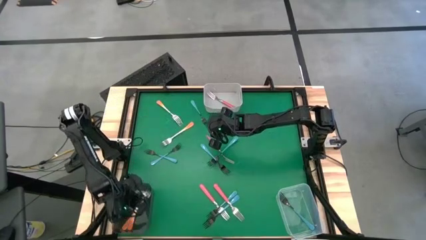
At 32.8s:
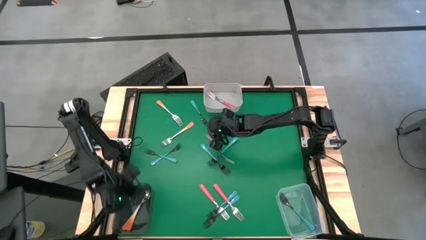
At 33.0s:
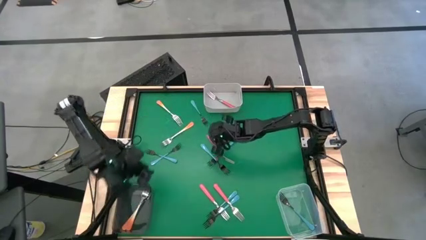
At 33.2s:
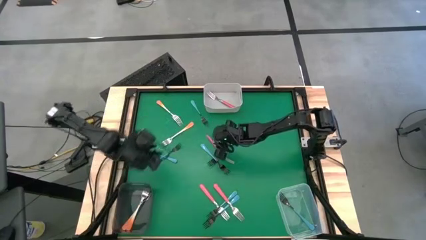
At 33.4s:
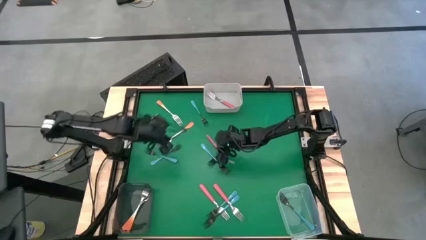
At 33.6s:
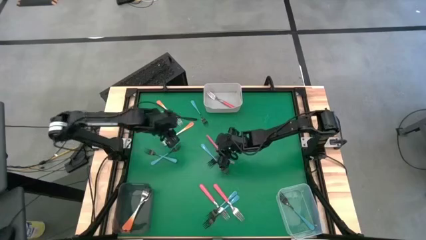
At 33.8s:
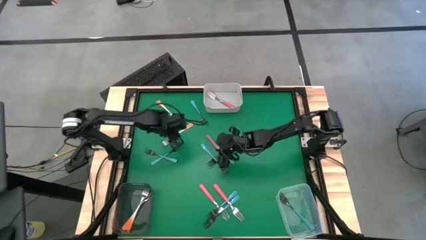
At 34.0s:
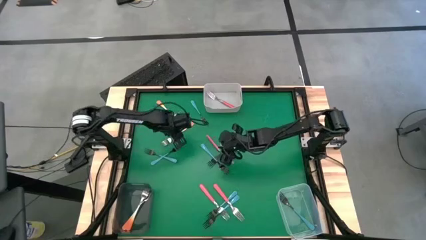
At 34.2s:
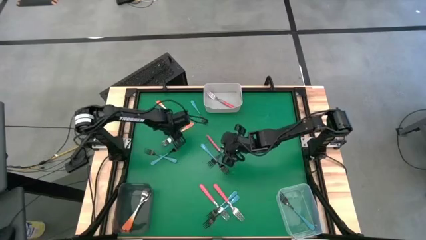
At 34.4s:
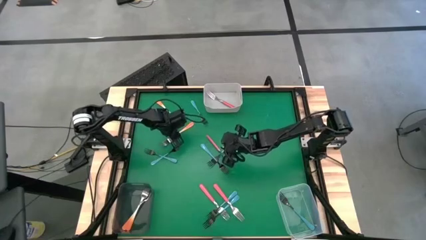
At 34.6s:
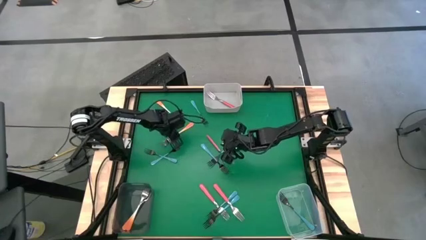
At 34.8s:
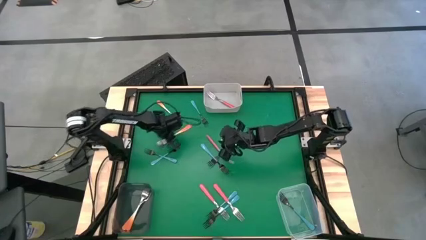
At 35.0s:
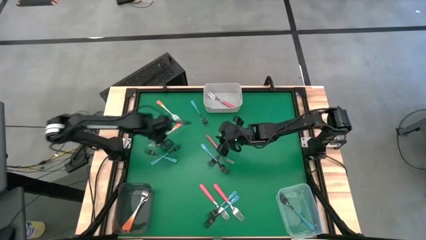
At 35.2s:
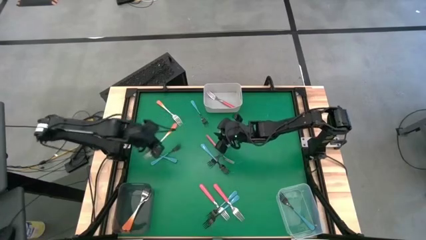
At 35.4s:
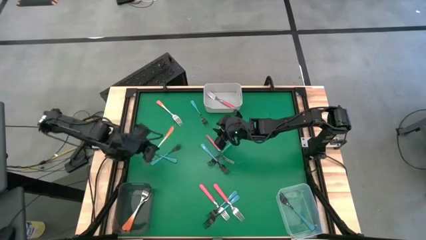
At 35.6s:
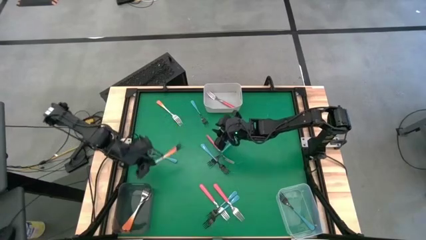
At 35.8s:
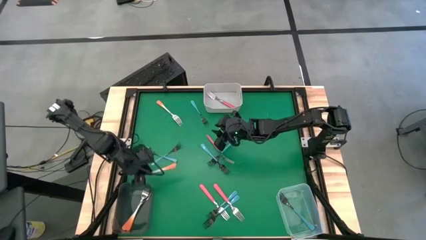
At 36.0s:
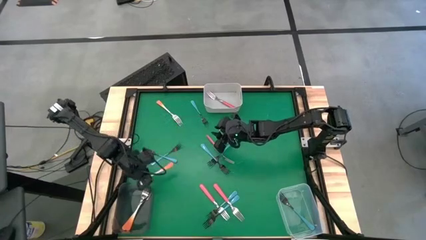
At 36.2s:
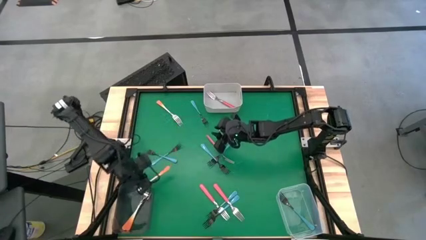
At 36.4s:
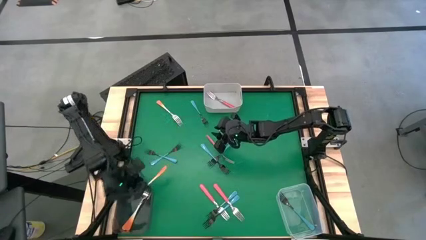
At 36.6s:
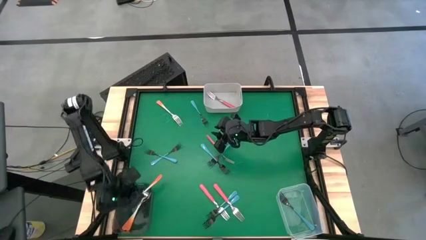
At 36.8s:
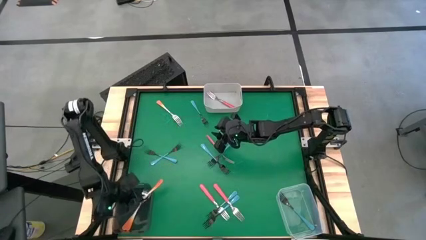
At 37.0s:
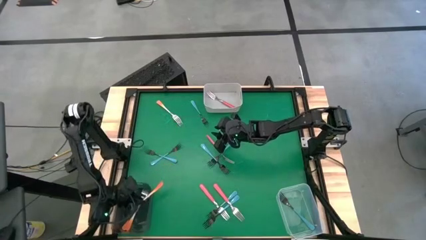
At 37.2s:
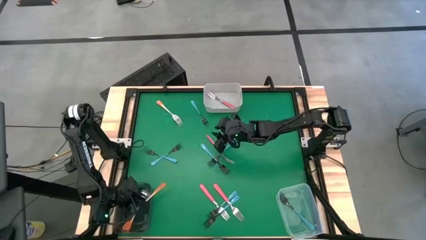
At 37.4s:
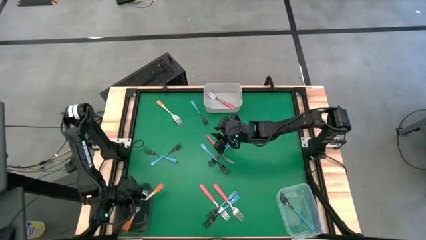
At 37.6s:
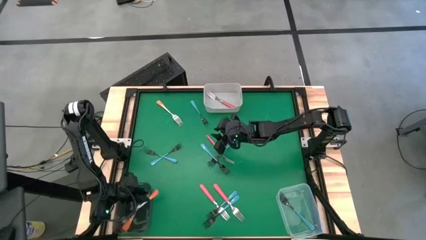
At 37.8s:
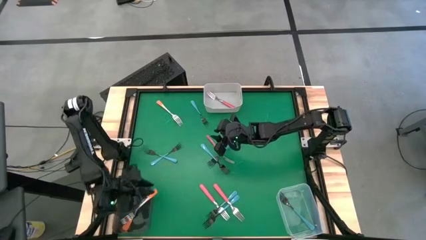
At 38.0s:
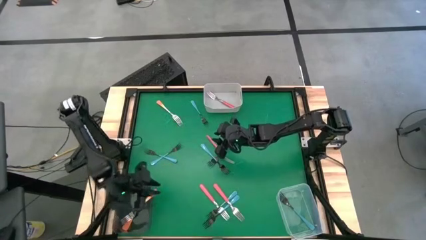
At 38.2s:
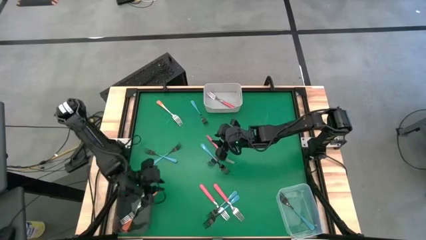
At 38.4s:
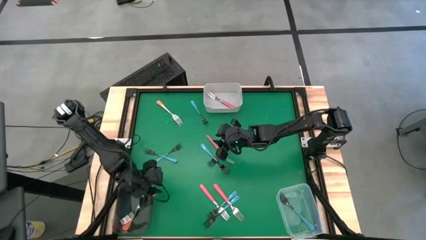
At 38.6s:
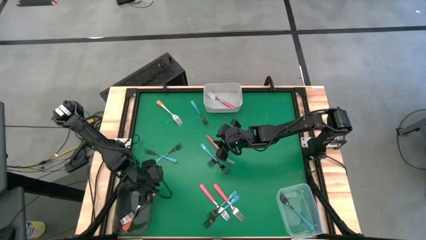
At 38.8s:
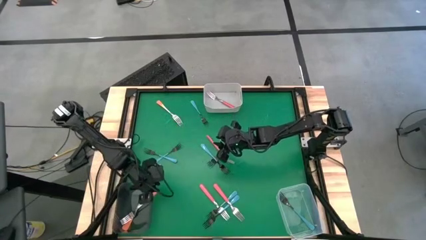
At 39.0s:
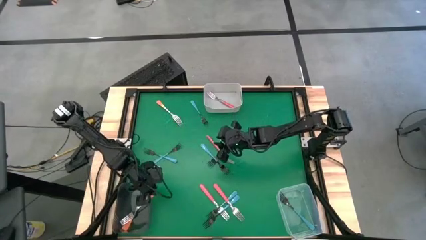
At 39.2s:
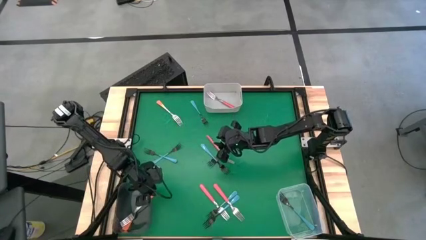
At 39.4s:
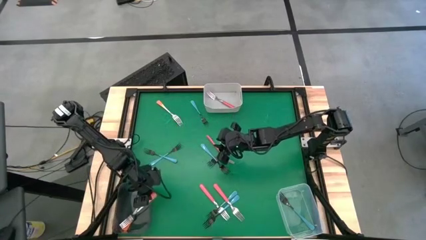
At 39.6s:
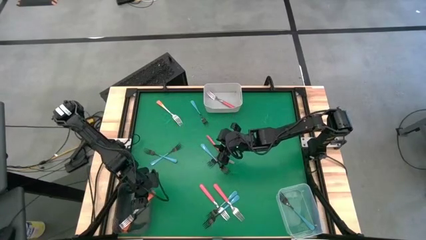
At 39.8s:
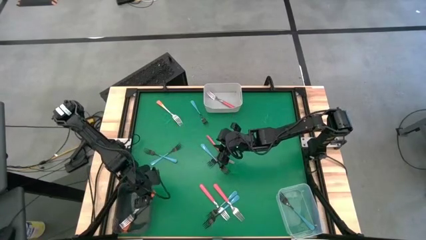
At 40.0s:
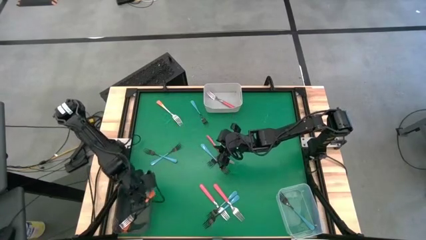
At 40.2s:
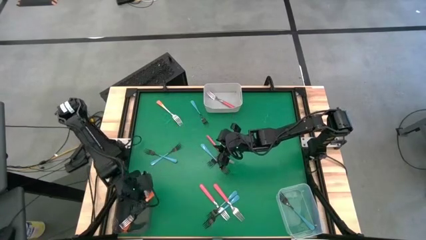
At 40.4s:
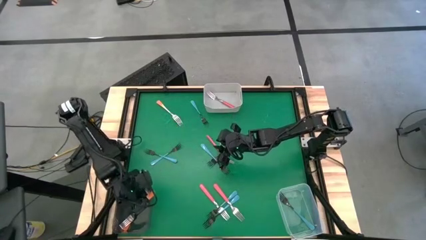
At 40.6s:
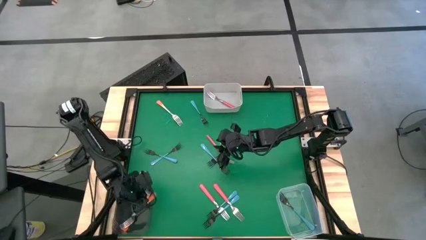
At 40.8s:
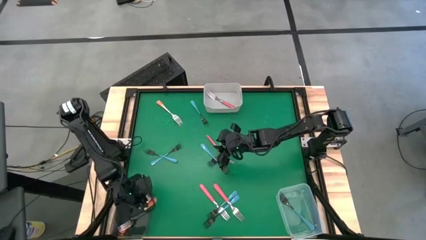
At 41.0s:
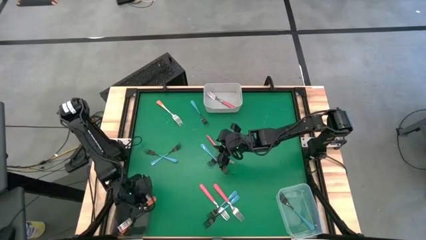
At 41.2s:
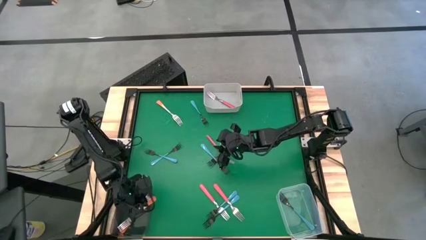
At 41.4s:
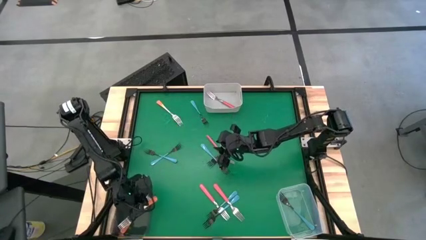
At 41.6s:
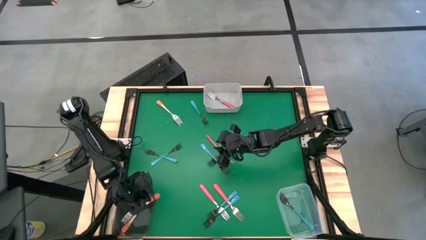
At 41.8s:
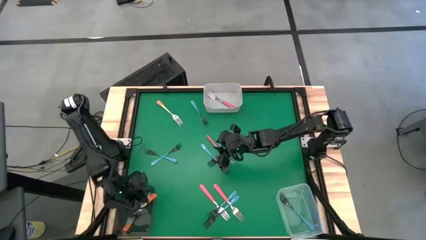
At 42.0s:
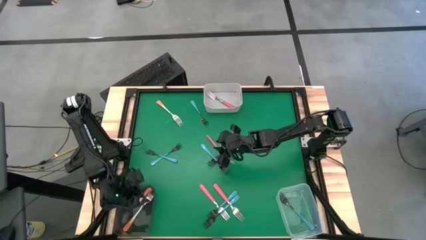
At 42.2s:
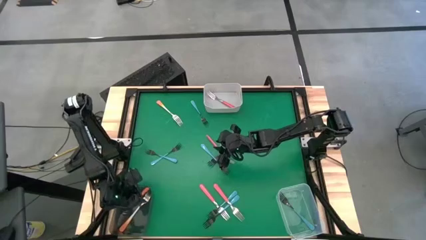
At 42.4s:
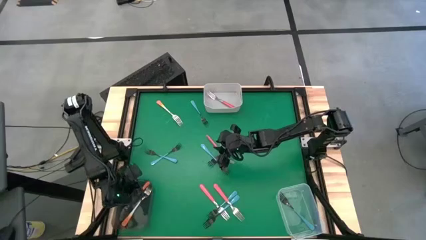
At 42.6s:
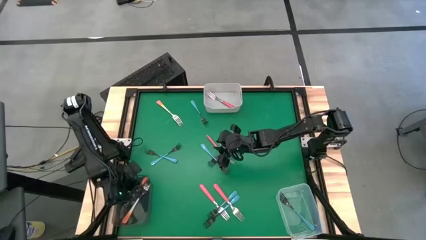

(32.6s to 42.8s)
Task: Sort silverware by color (type)
Put the orange fork into the black bin

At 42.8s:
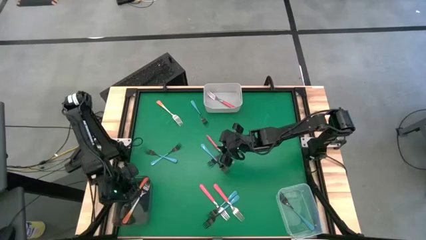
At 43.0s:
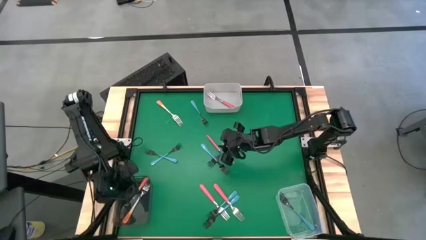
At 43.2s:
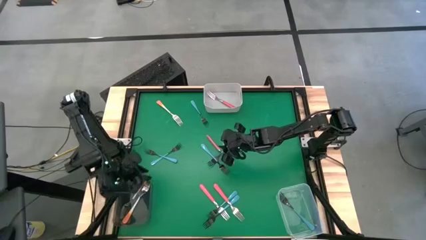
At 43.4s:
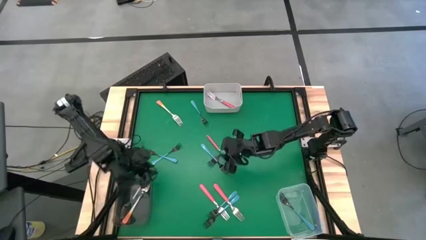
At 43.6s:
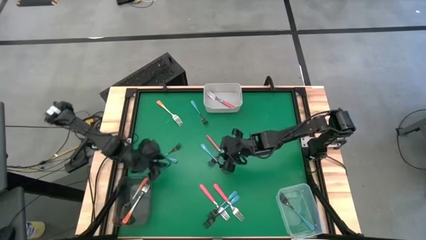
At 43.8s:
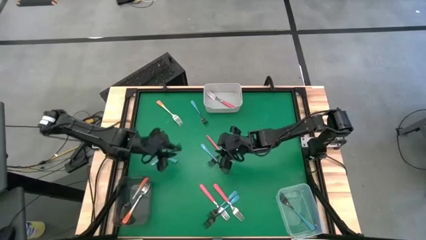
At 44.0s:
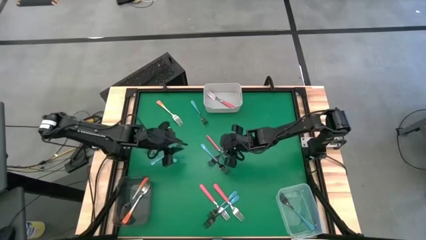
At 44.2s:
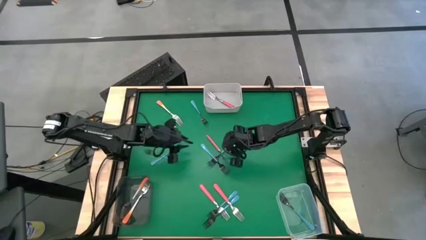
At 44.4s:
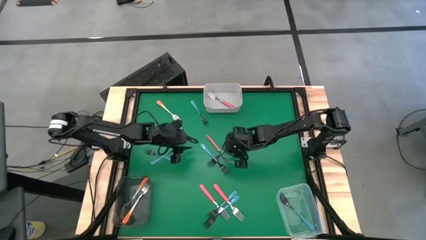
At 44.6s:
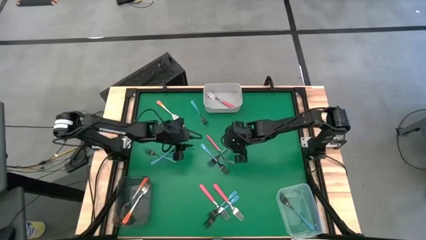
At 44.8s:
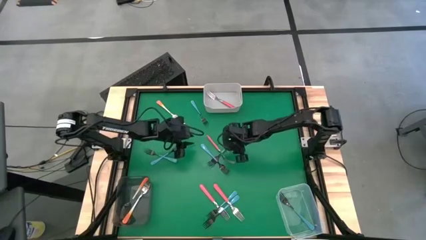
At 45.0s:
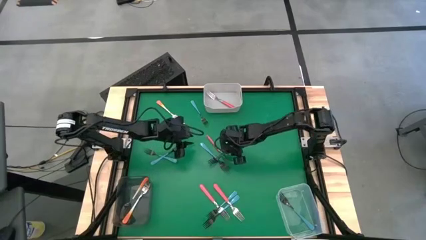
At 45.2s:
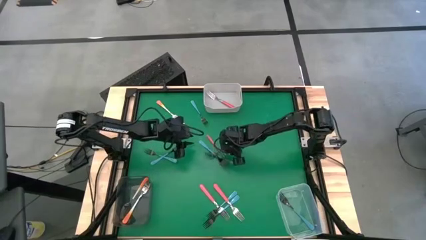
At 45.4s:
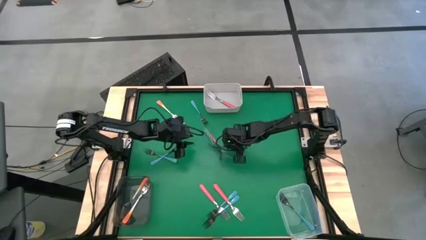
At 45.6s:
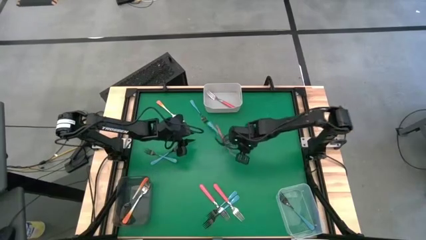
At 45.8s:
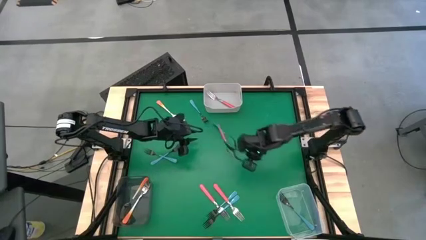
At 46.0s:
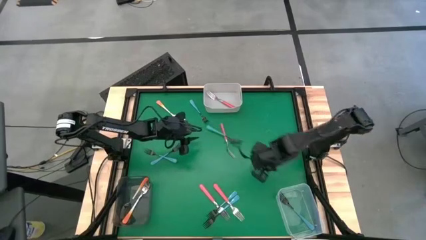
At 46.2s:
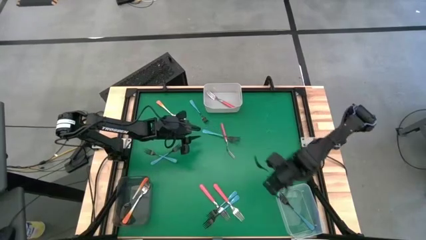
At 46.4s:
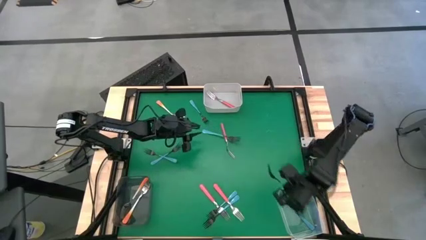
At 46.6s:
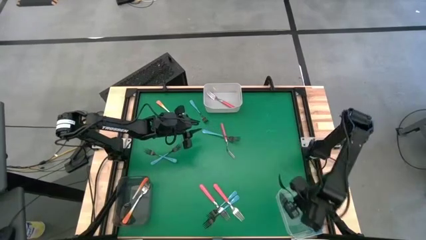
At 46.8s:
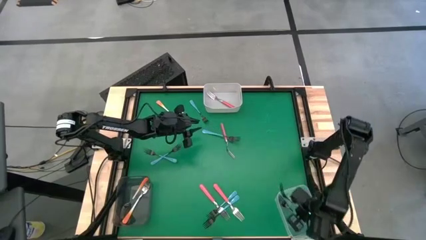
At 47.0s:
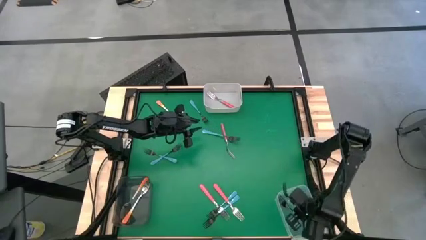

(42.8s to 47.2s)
Put the blue fork into the transparent bin

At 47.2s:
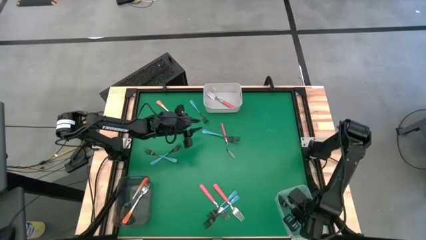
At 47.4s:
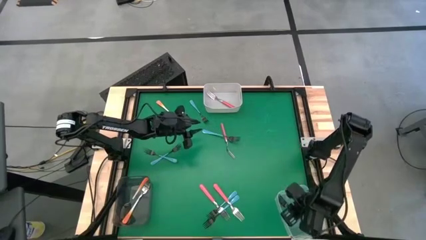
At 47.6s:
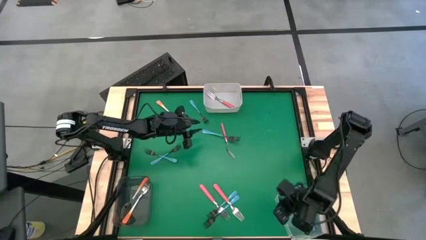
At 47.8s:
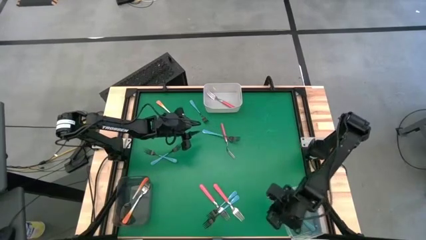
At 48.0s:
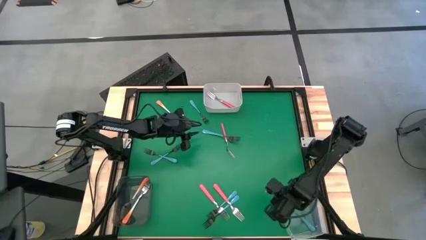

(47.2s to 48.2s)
Adjust the transparent bin on the table
